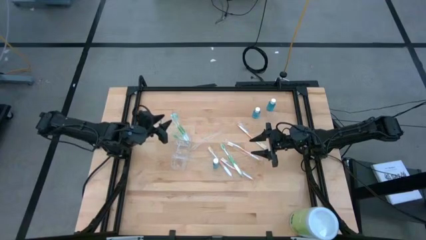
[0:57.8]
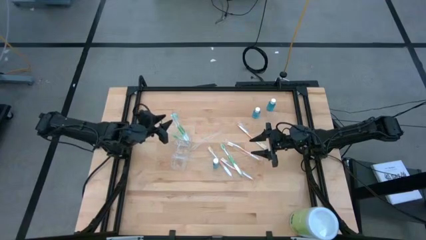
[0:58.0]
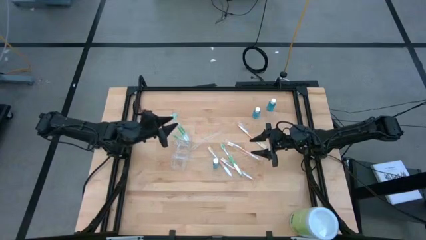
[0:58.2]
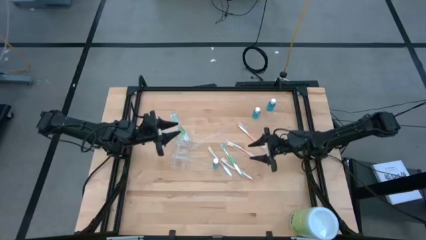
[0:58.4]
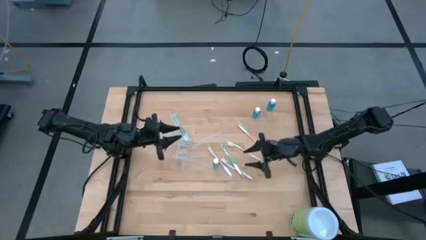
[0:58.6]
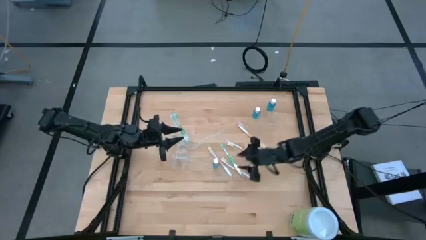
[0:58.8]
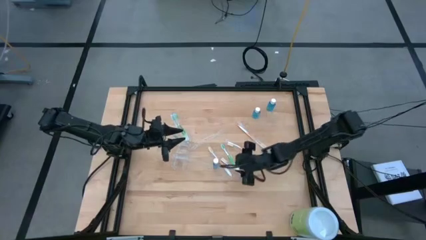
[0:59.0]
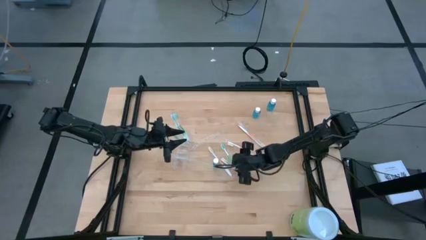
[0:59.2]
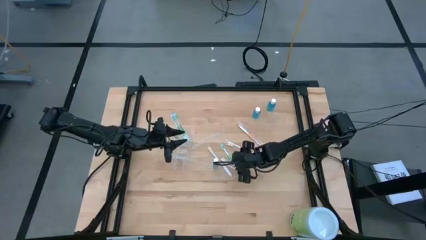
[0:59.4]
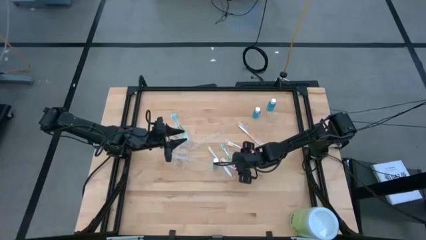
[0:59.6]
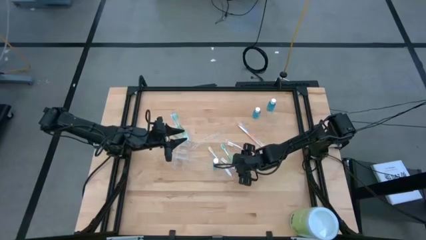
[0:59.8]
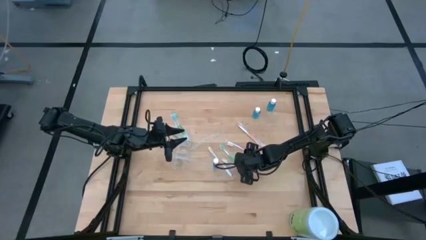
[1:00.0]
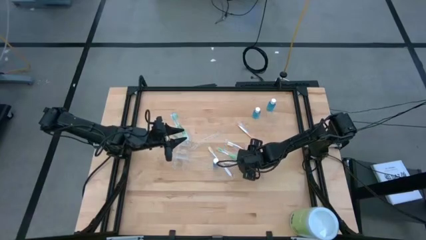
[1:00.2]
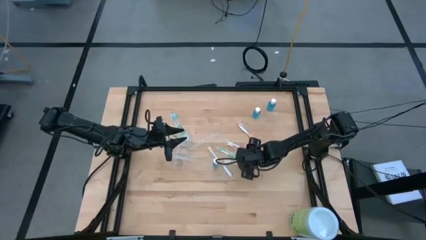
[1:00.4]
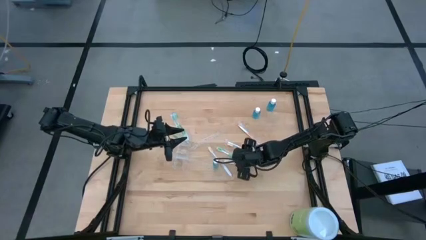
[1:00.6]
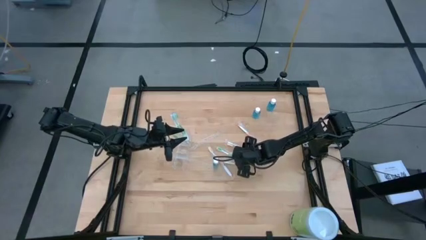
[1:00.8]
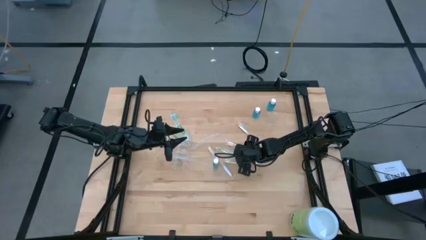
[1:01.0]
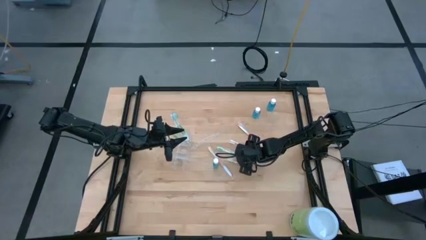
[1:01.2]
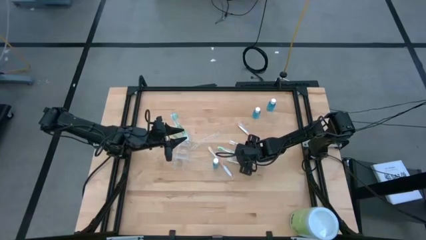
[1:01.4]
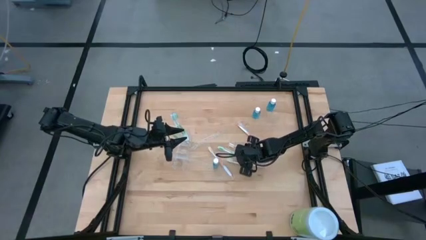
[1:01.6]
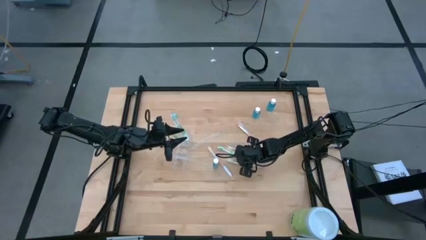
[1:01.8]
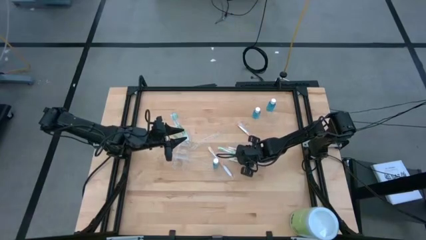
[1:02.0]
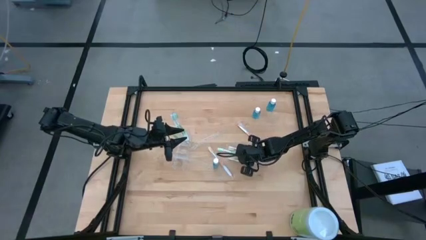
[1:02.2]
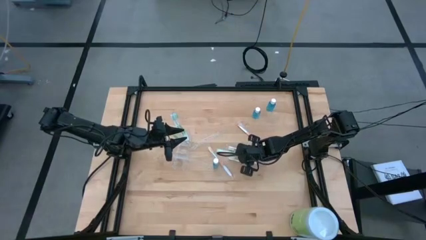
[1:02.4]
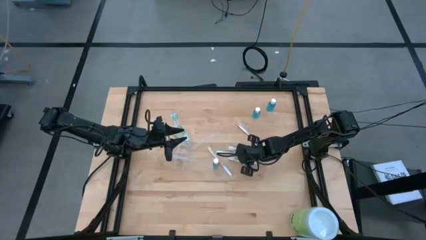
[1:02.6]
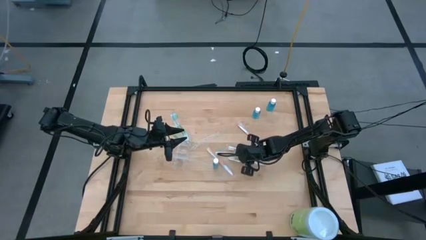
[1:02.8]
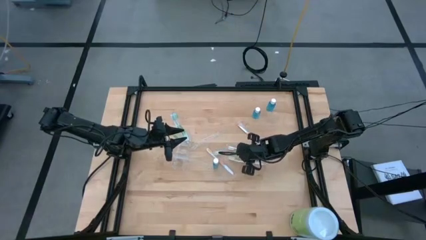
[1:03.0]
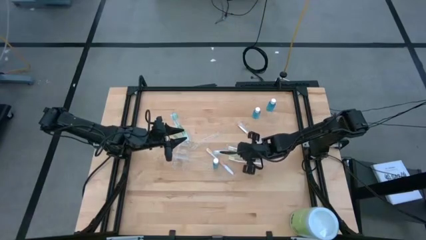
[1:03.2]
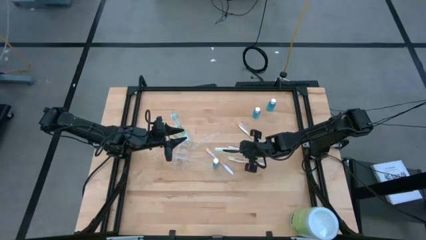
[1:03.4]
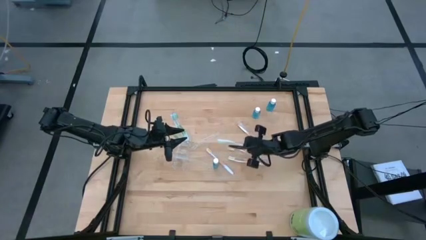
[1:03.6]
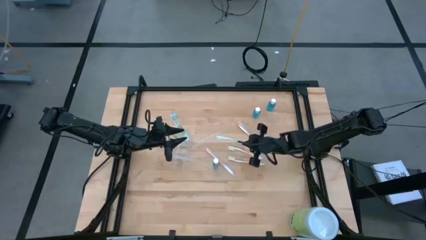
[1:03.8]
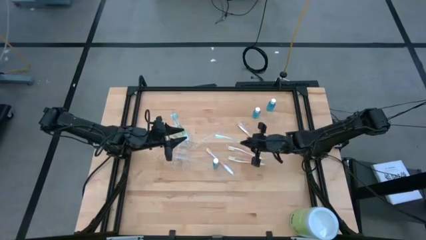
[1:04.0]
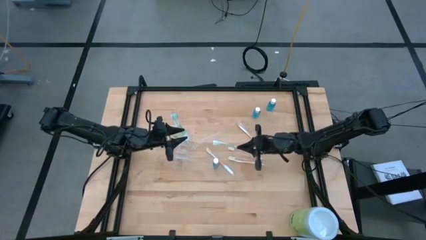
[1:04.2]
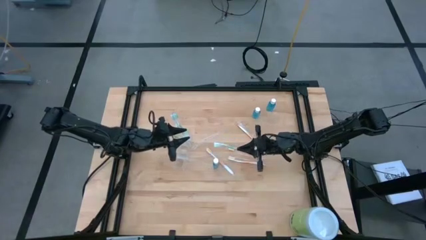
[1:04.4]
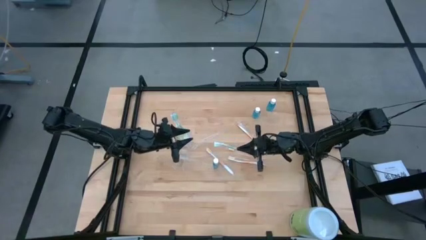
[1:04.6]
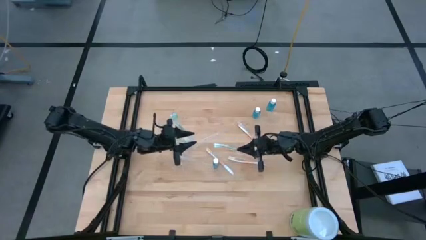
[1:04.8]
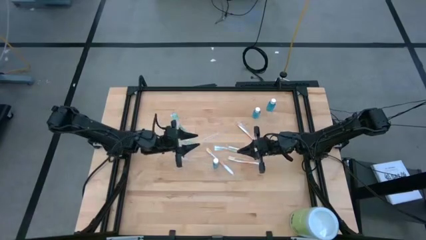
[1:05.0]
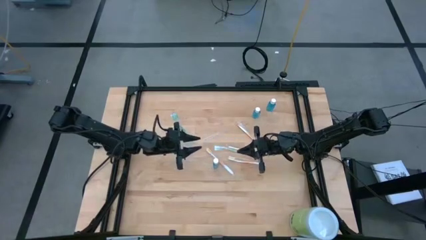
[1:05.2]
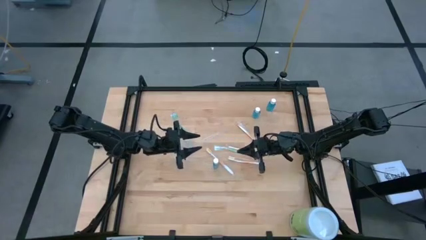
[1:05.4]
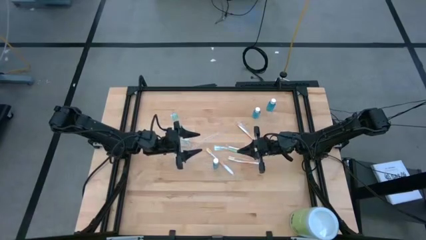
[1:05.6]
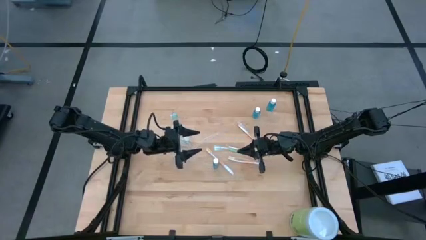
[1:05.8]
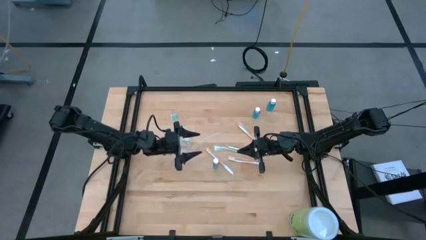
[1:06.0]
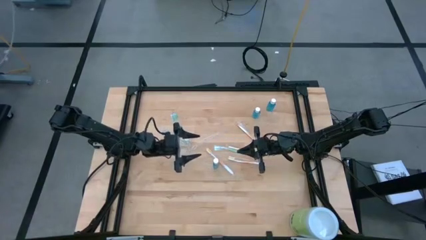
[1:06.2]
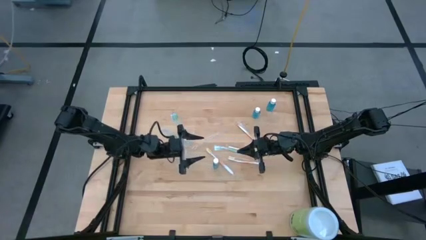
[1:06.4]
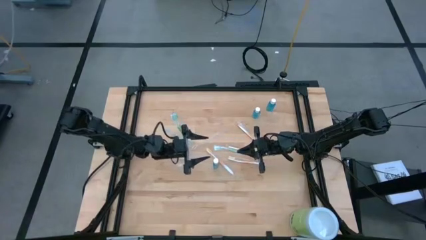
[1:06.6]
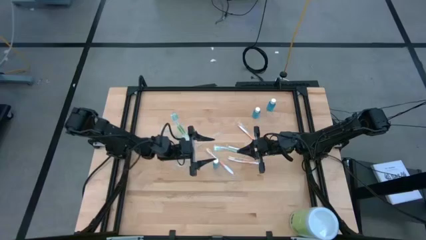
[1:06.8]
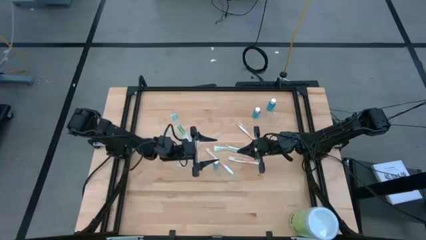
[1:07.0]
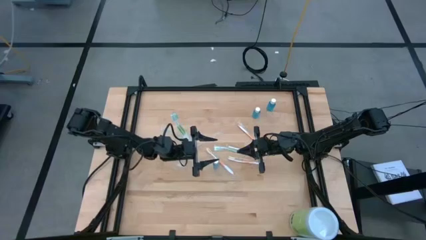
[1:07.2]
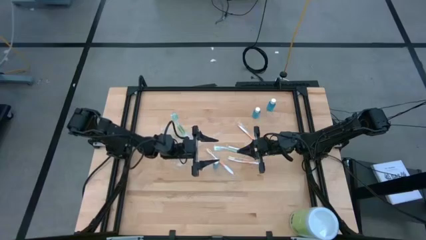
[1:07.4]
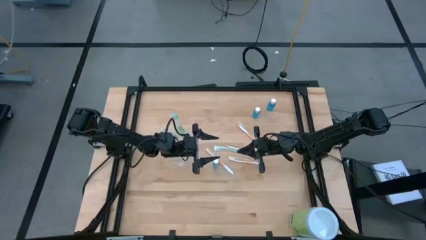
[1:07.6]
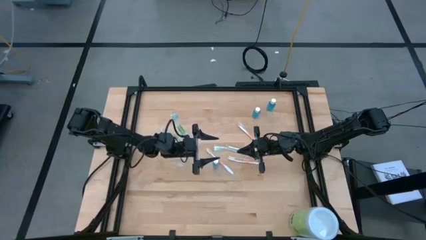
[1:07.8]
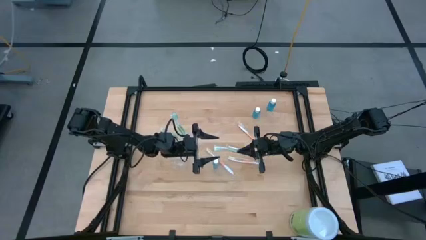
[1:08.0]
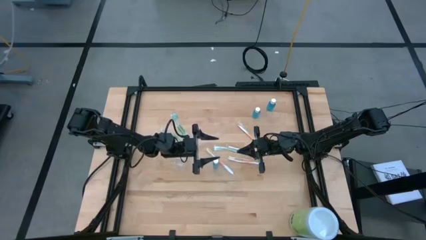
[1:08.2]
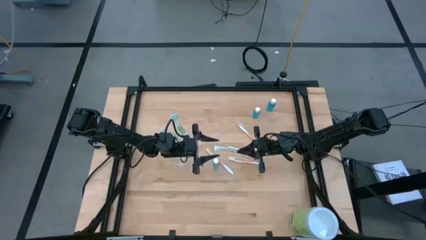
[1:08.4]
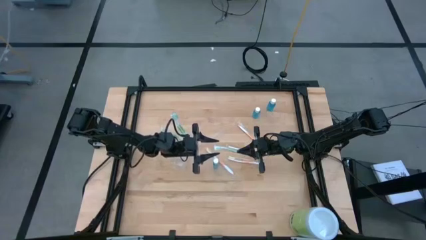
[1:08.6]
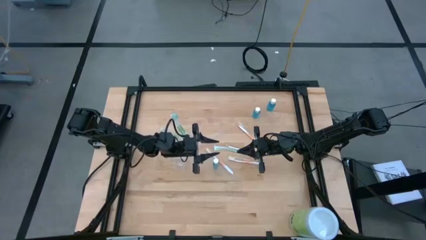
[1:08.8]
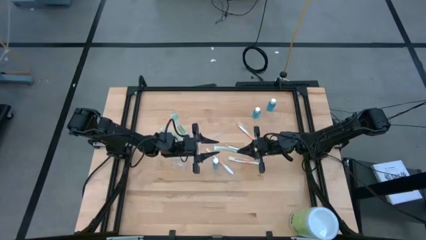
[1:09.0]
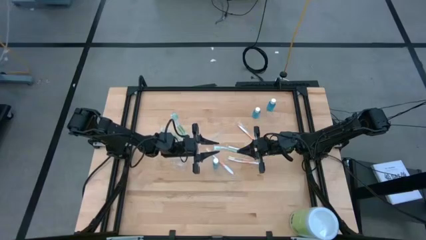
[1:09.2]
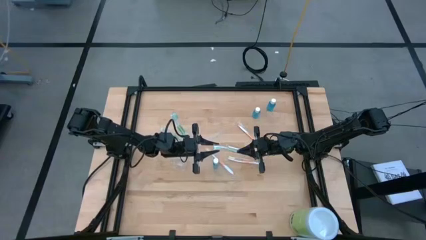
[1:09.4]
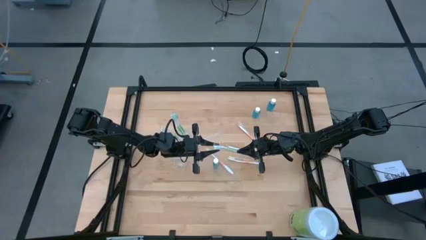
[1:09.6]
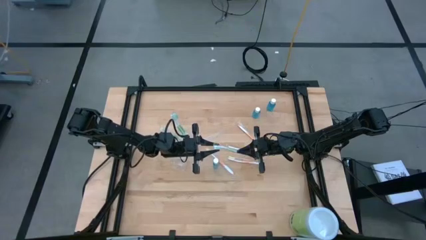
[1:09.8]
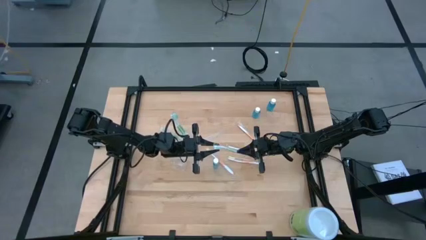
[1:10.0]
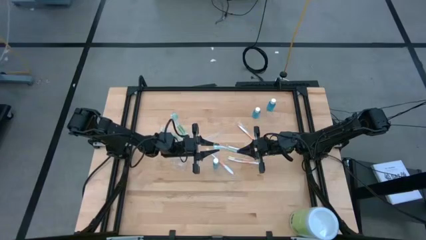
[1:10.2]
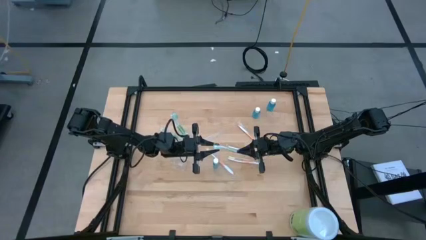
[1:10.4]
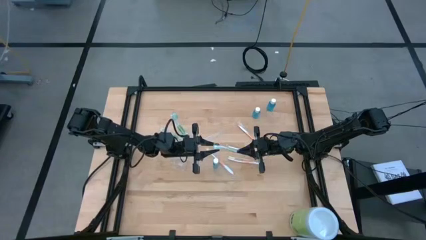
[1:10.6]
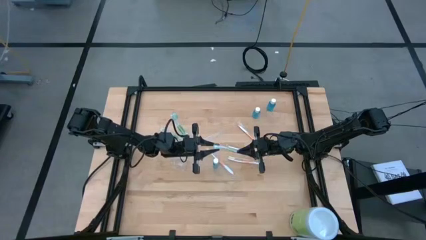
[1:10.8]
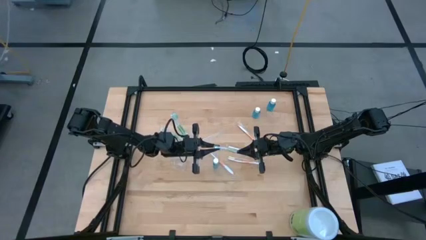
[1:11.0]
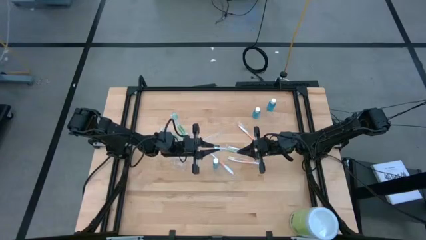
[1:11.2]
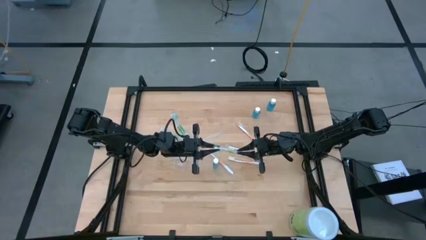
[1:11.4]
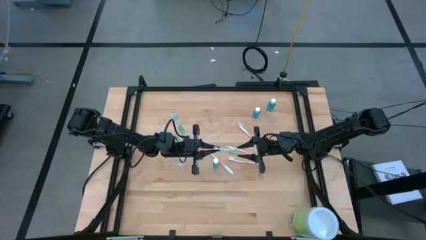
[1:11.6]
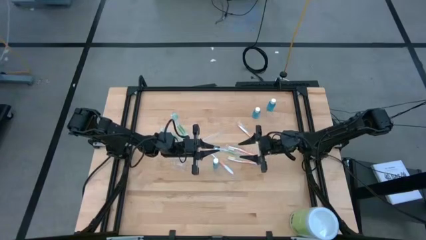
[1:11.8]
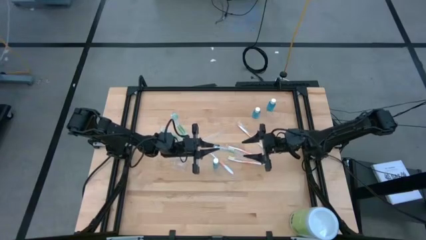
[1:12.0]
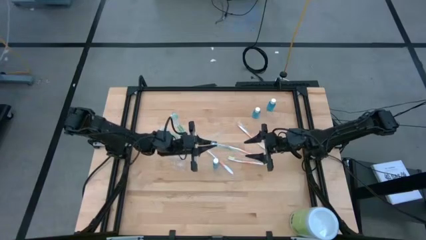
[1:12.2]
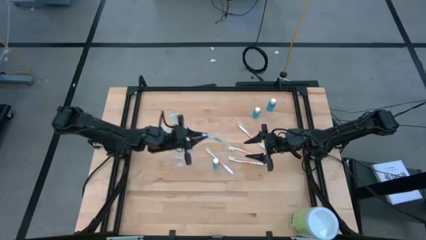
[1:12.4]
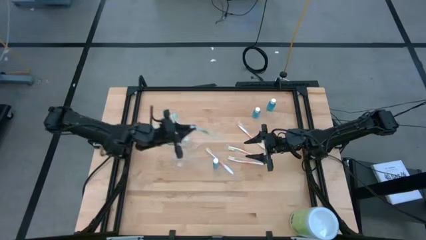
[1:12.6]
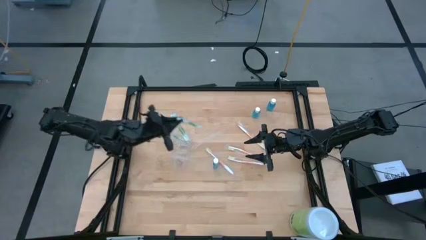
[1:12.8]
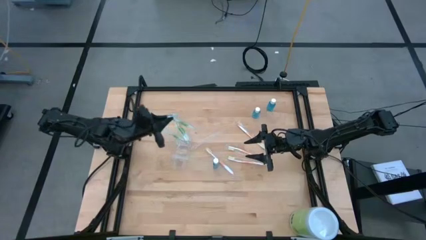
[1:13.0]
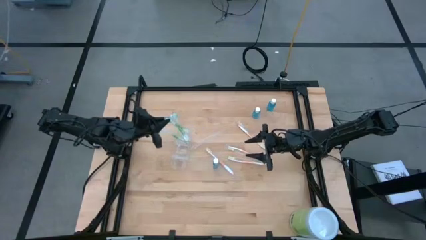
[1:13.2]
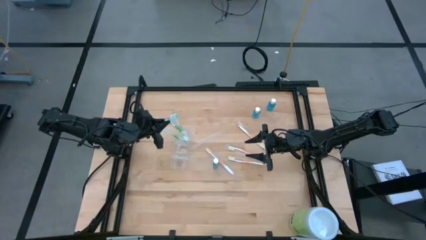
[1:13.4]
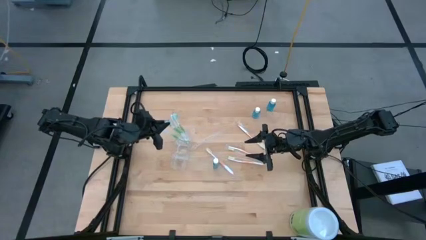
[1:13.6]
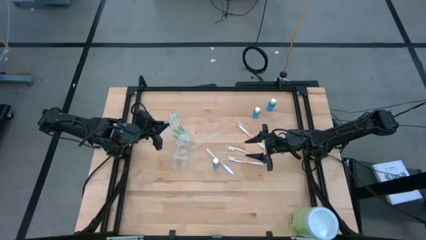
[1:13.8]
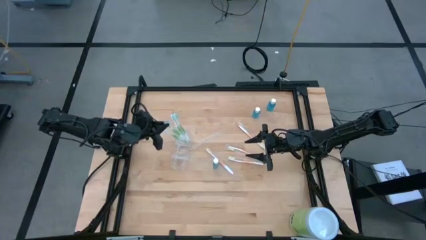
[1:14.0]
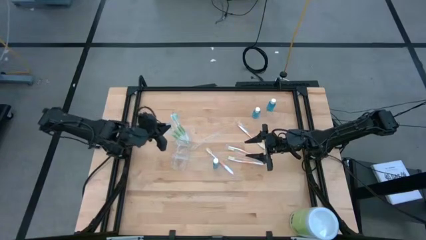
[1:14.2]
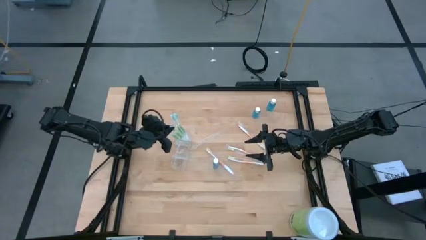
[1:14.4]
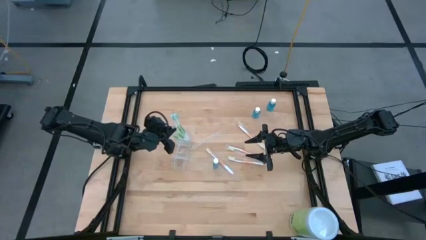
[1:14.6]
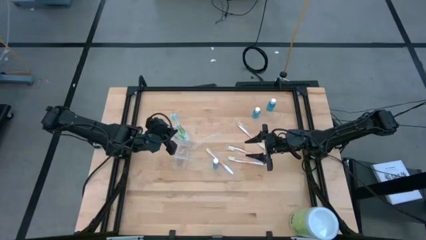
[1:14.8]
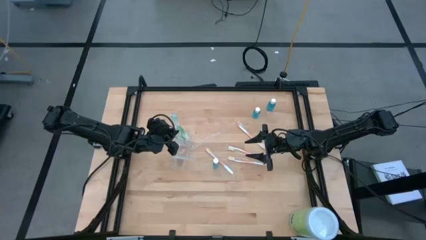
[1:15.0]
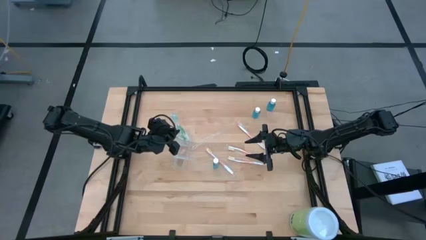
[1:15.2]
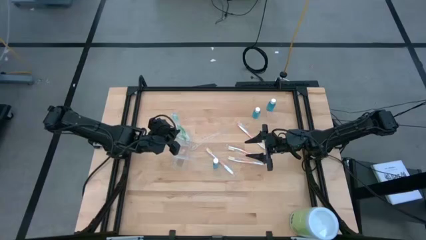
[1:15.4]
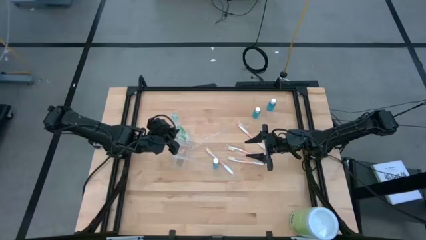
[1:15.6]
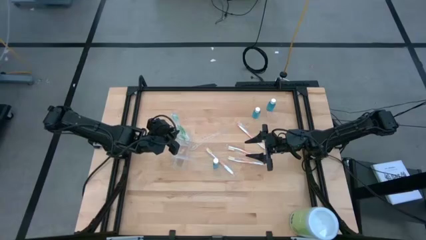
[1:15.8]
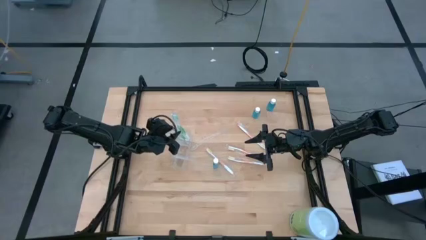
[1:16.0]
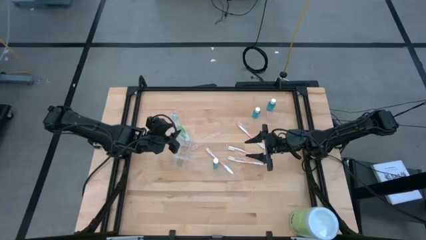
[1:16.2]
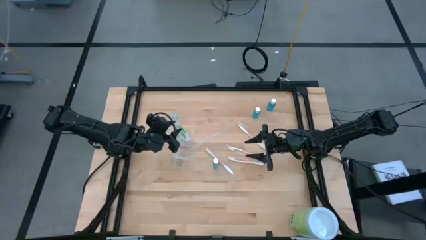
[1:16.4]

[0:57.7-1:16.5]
Task: Pick & Place toothbrushing station
Put the green toothbrush into the top section of the transparent organizer
